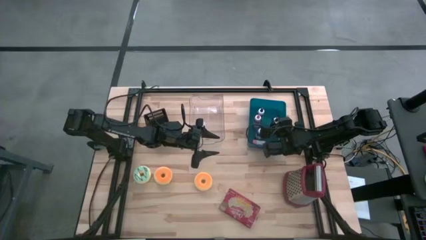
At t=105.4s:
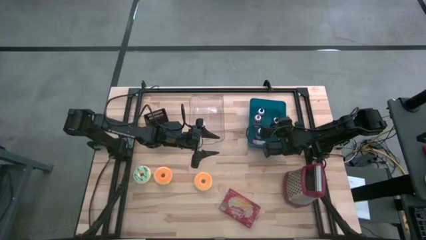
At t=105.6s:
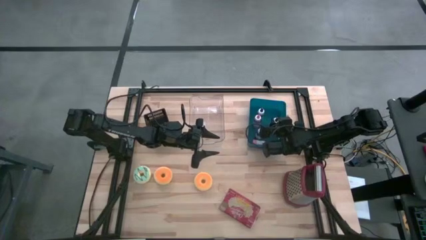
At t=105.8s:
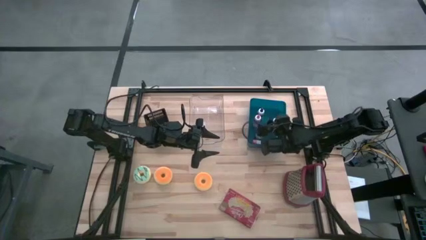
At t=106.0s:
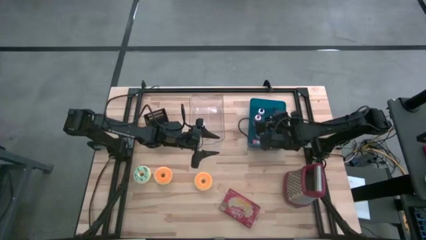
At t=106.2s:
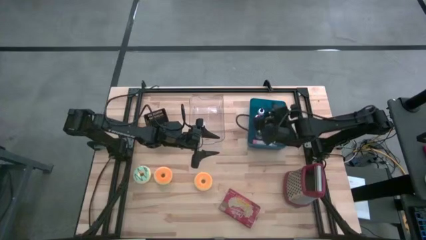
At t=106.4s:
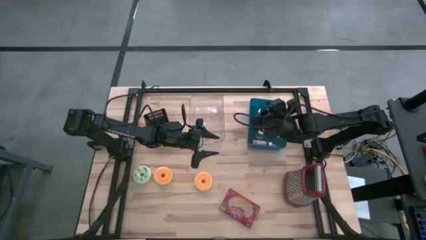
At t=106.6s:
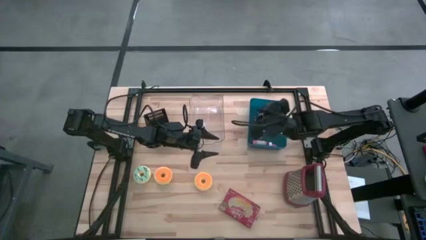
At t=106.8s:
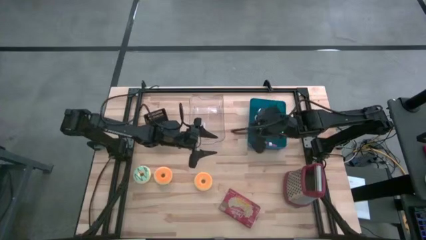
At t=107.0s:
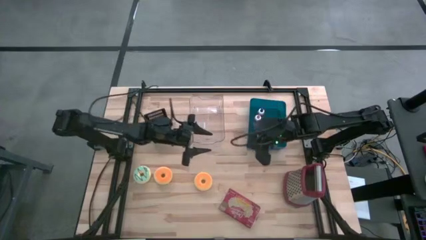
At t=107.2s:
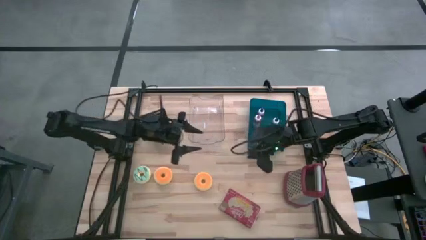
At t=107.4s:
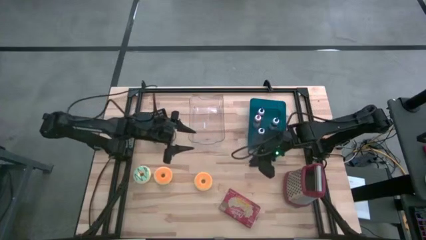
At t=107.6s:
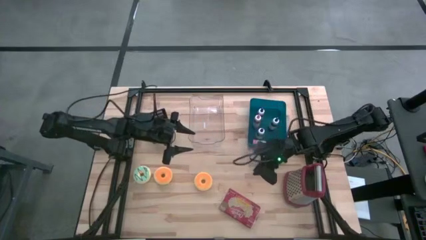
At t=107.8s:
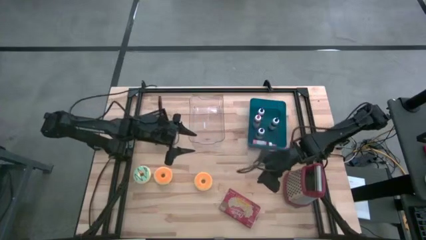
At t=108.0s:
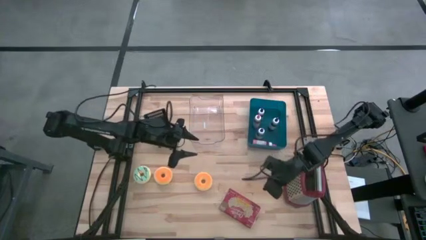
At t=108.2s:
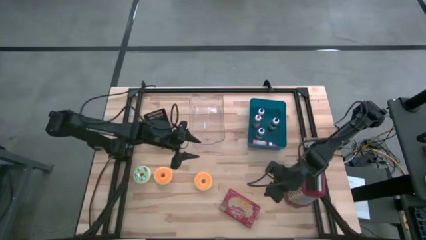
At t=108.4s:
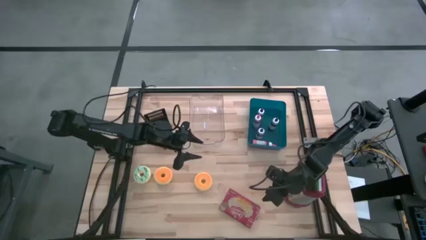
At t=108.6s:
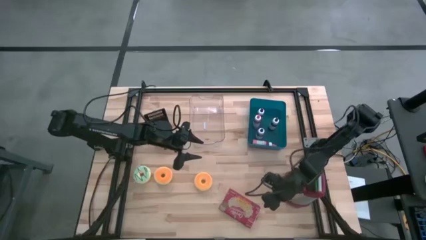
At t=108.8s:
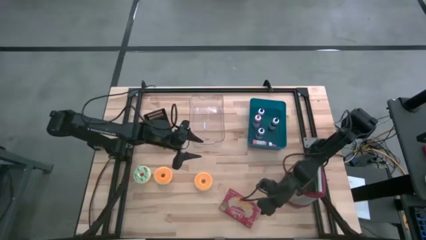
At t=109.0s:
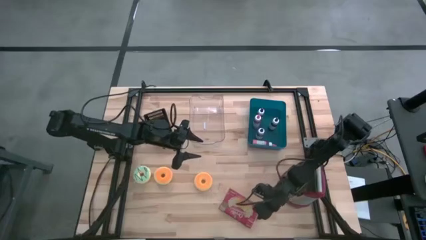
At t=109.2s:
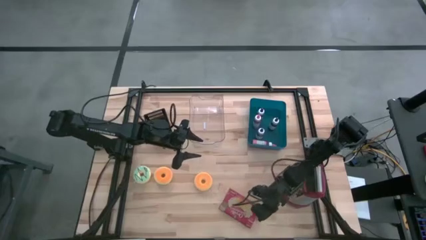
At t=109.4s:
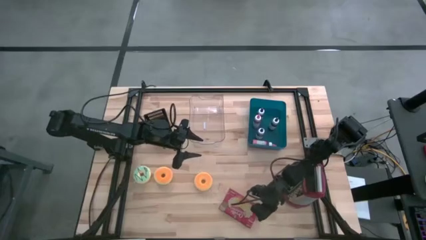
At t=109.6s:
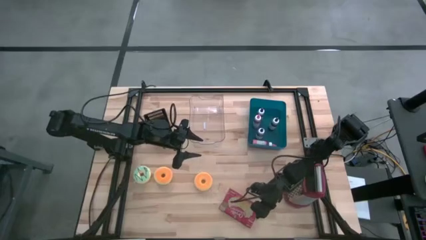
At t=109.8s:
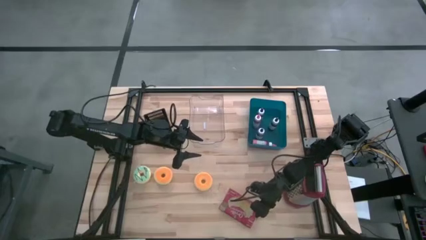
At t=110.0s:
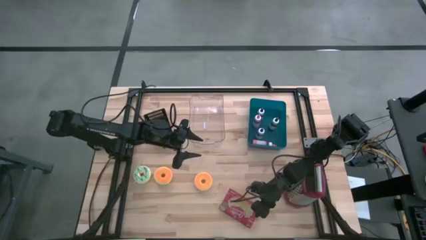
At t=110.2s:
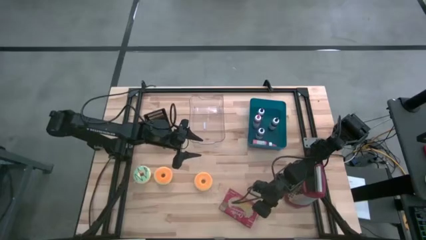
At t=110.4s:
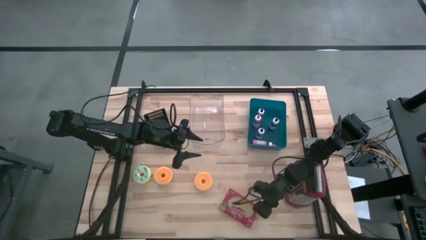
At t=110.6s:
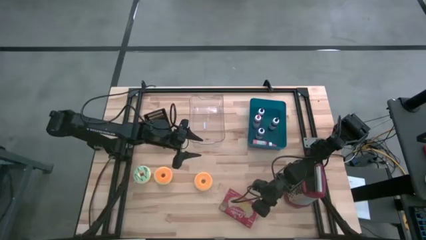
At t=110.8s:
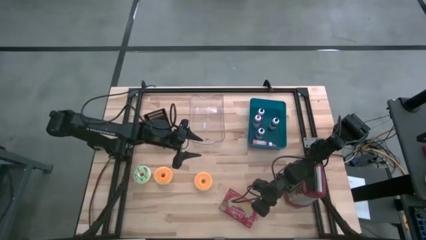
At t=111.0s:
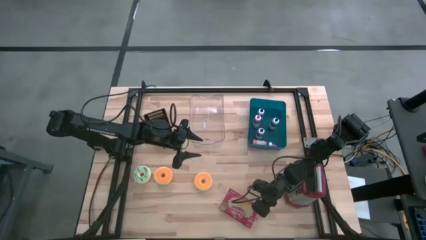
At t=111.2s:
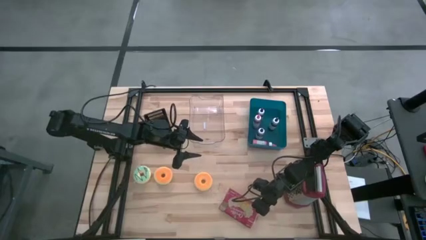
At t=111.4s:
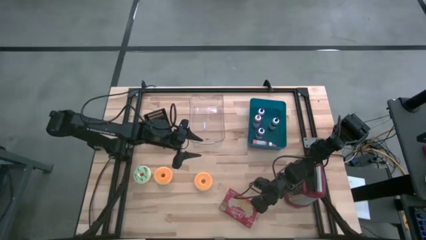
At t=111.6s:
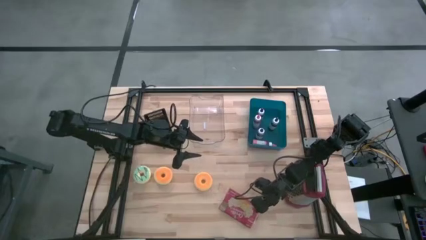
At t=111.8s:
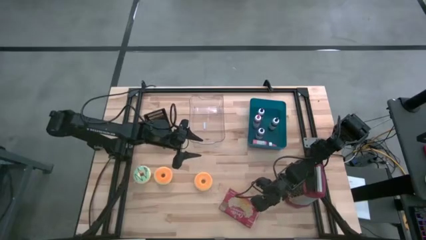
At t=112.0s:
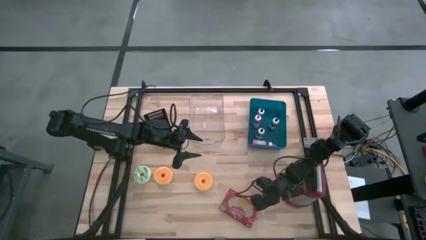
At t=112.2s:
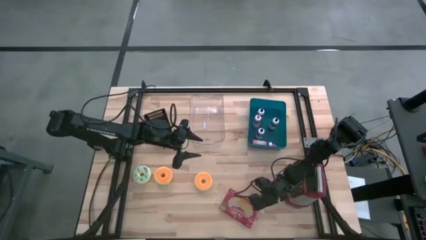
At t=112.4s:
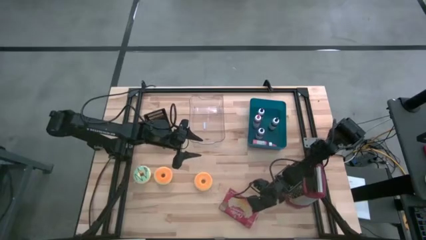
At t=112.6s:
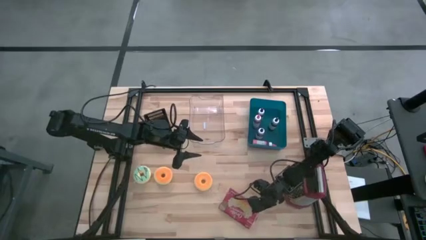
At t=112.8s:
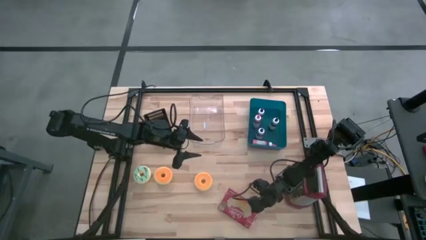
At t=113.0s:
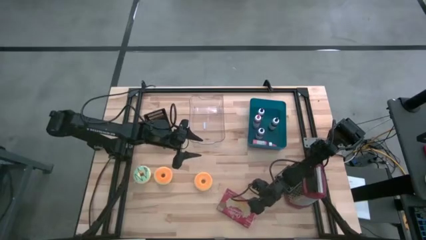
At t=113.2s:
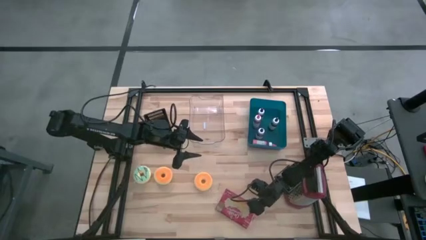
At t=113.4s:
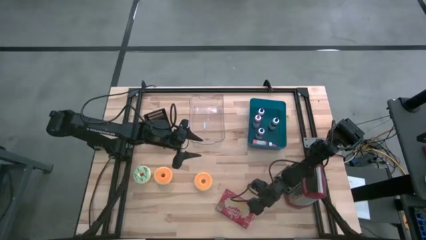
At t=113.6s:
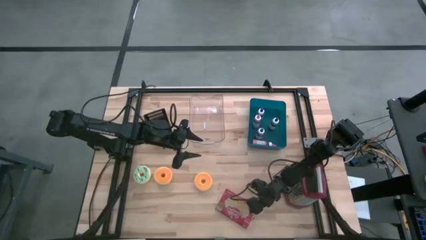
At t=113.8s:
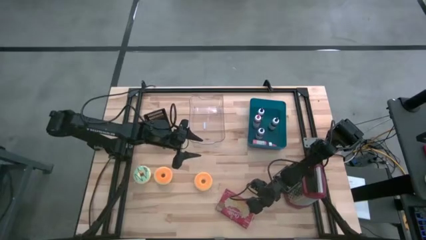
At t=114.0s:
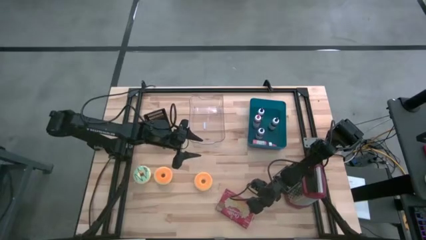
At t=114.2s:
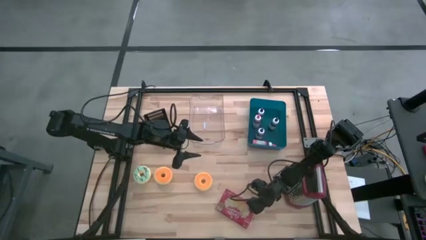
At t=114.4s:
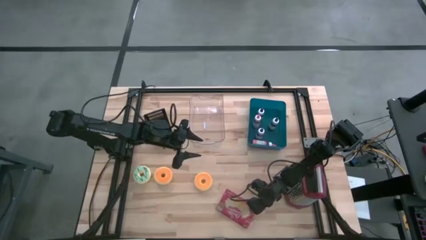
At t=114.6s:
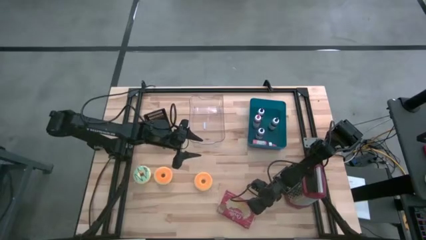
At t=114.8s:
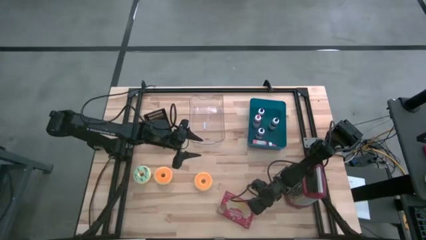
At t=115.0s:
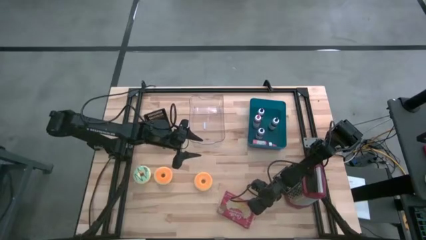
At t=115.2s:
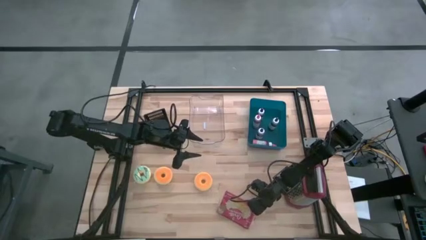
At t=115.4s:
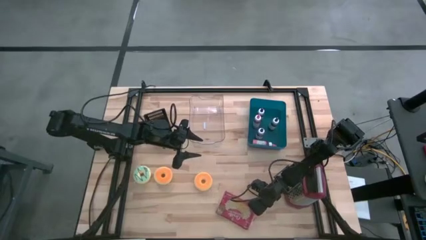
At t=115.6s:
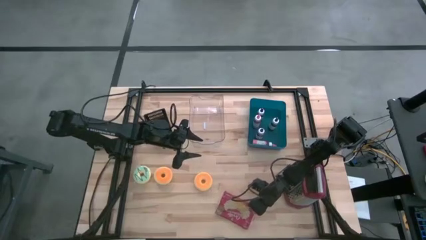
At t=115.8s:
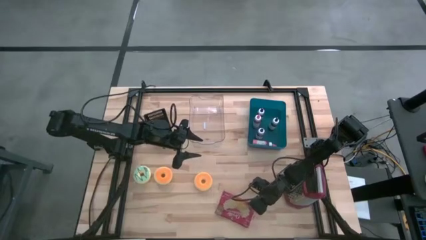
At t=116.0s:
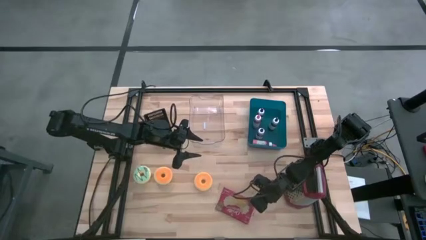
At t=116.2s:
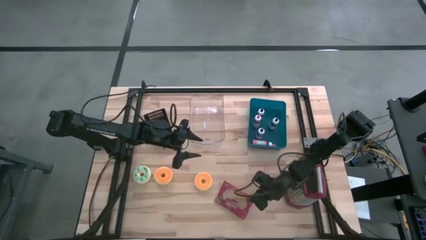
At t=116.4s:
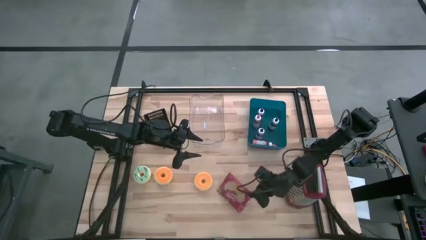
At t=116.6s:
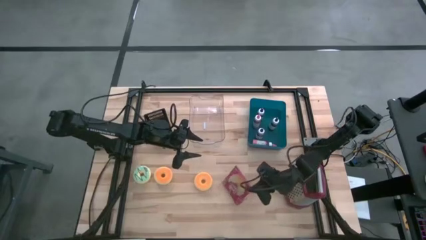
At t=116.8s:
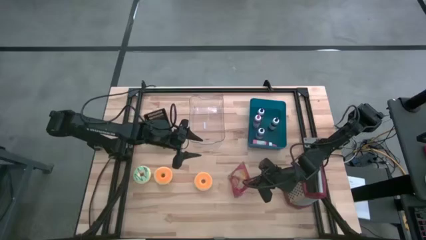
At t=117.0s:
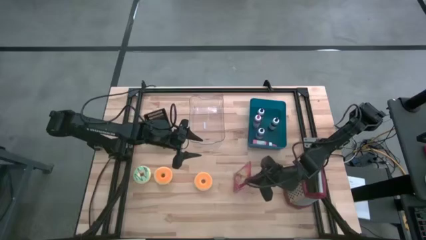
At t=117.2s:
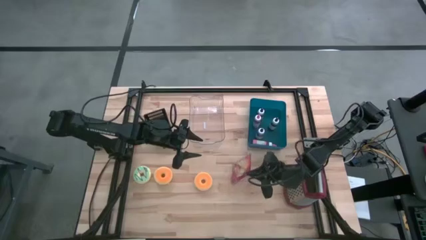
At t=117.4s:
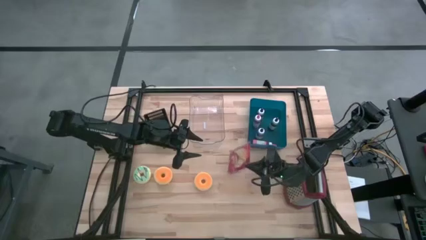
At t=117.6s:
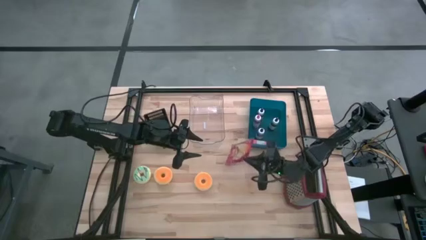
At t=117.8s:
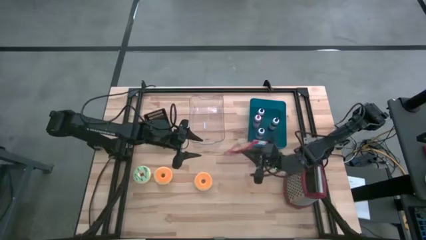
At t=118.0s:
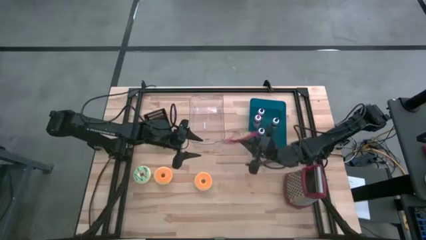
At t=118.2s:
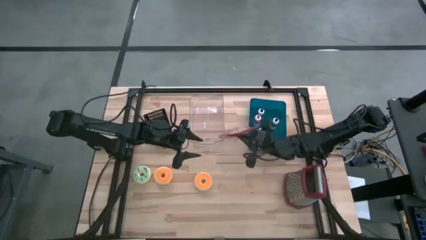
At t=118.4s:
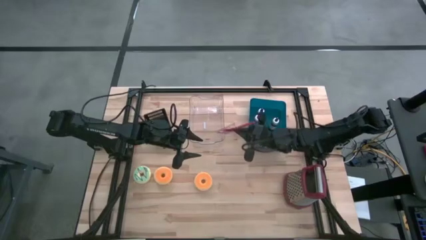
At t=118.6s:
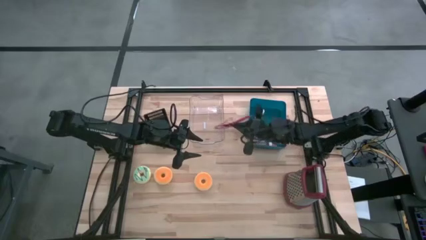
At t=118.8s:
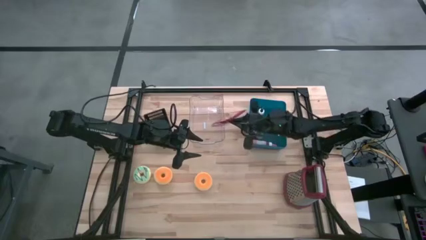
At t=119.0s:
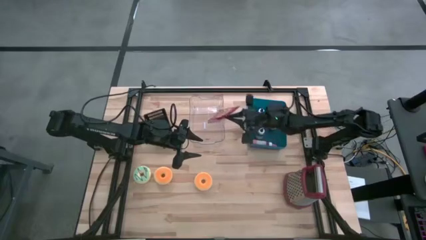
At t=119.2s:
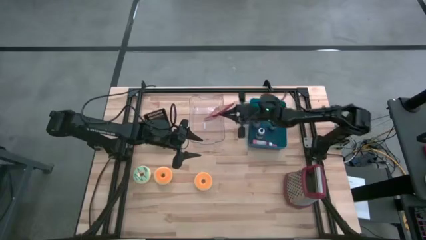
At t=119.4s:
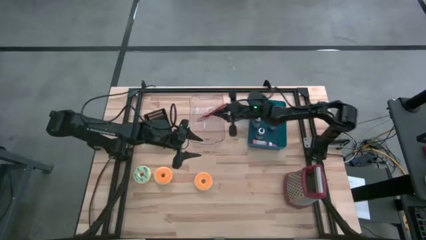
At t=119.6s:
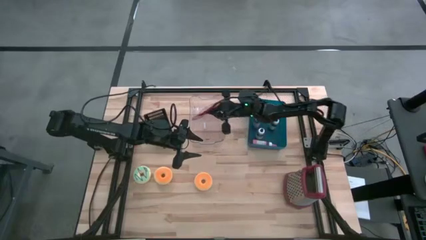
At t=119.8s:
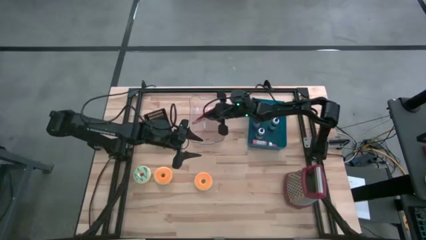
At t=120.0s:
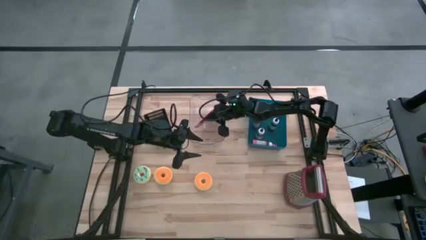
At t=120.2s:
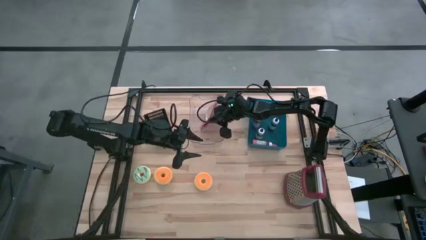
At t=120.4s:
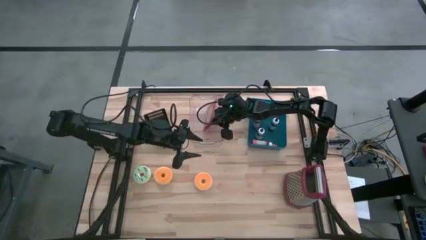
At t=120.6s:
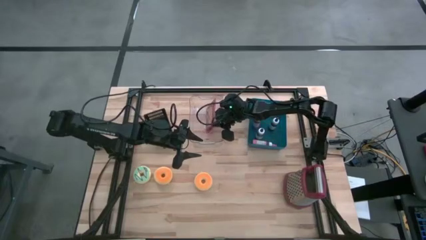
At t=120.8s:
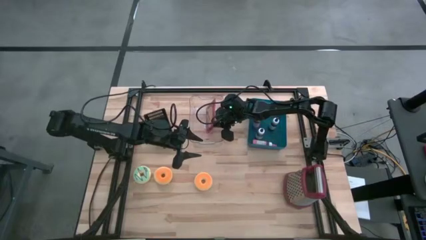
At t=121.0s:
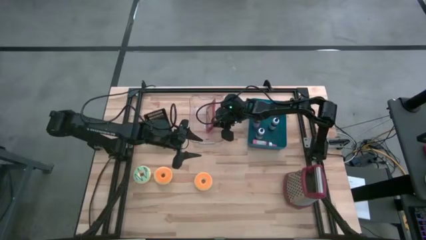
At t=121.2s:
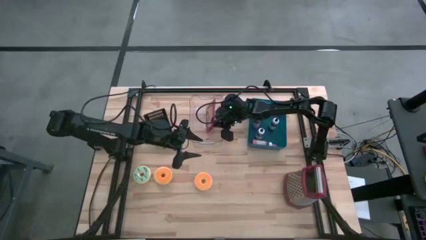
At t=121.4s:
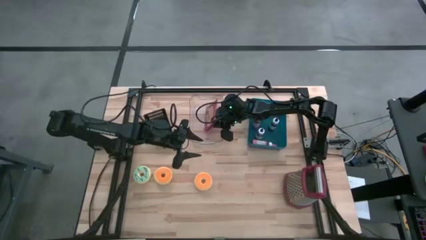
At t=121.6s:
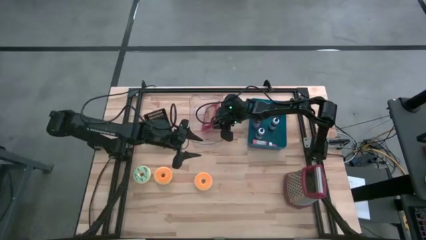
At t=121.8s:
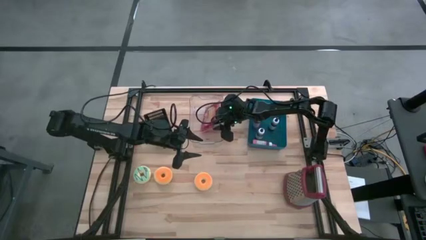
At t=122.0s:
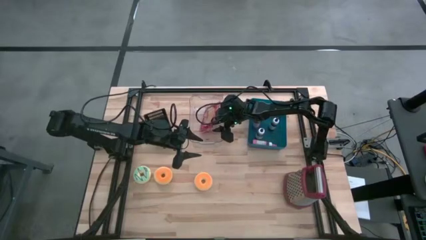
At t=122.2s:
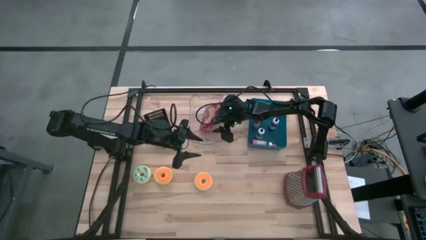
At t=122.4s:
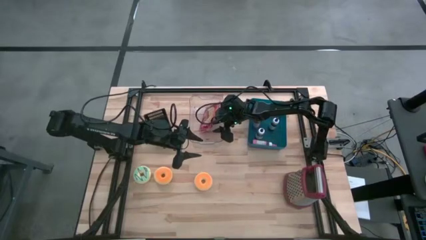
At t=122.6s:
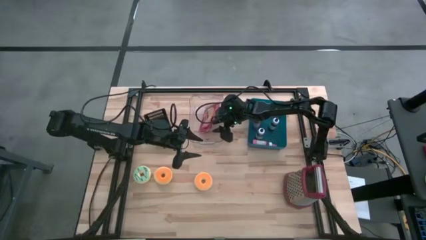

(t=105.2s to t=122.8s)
Task: Pick & Place Food Item
Put the red popcorn bag into the transparent bin
